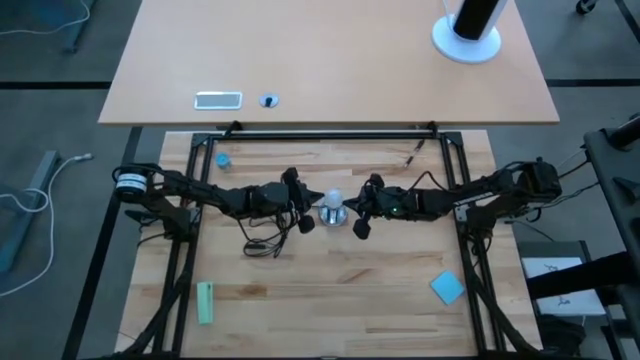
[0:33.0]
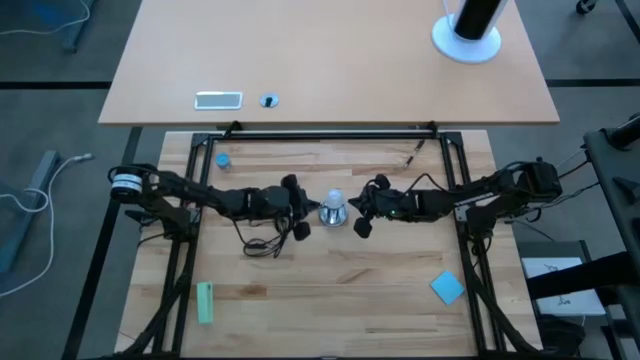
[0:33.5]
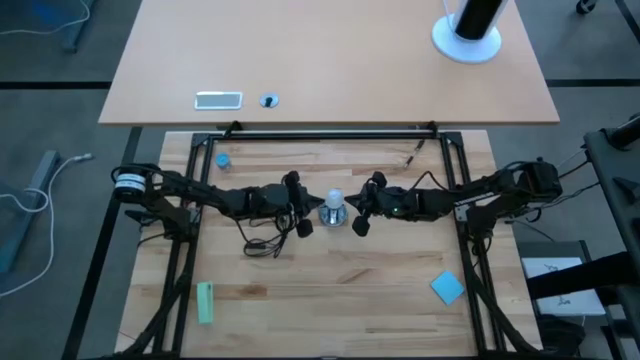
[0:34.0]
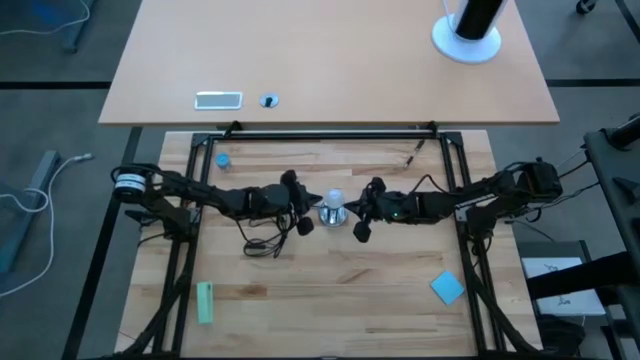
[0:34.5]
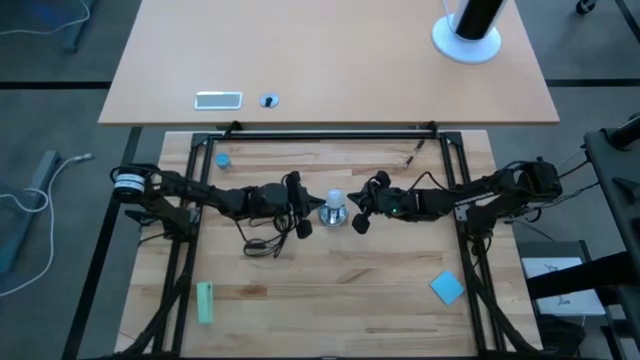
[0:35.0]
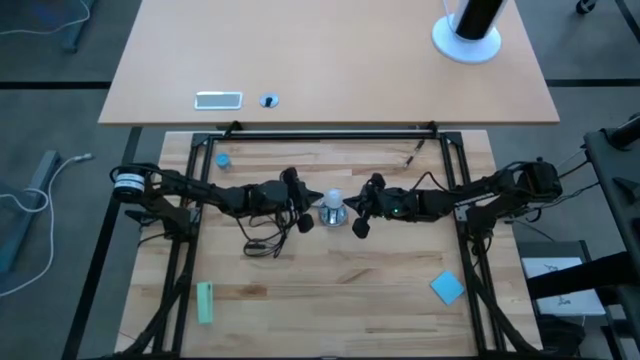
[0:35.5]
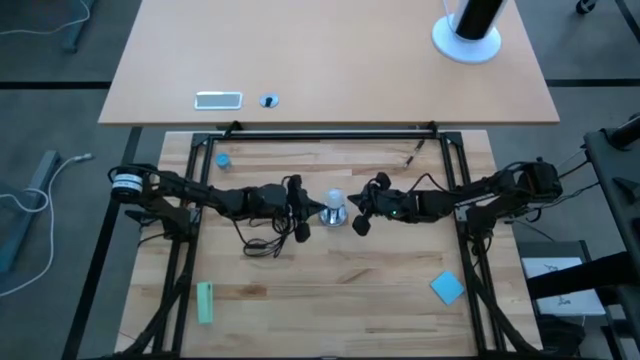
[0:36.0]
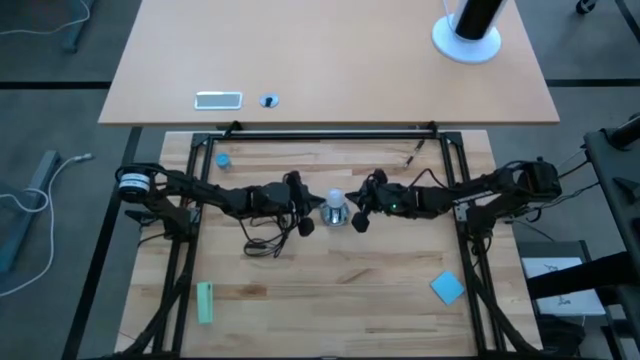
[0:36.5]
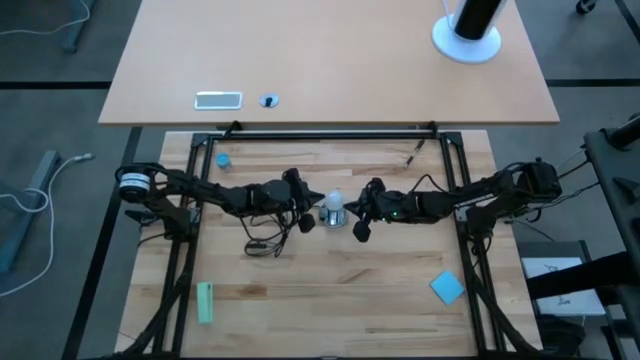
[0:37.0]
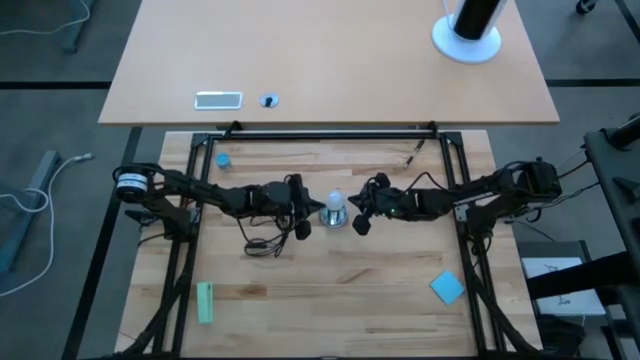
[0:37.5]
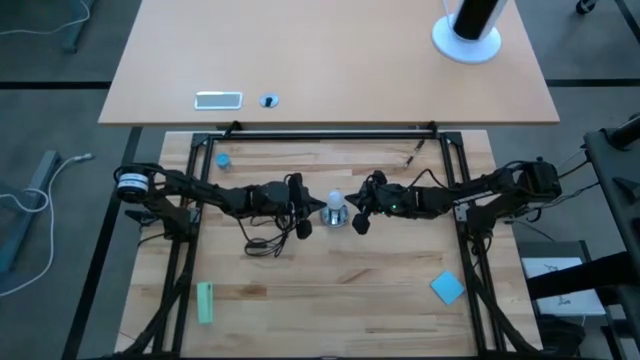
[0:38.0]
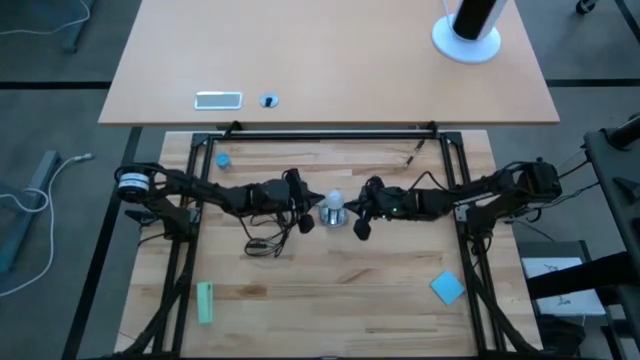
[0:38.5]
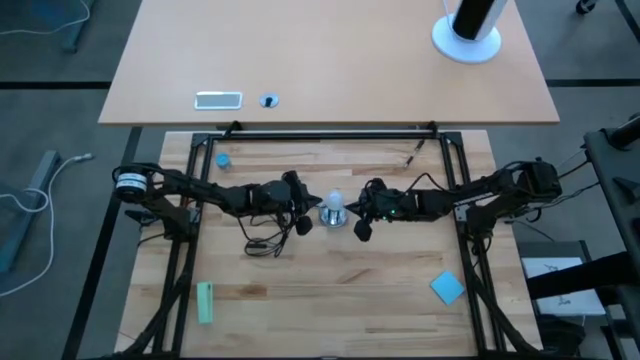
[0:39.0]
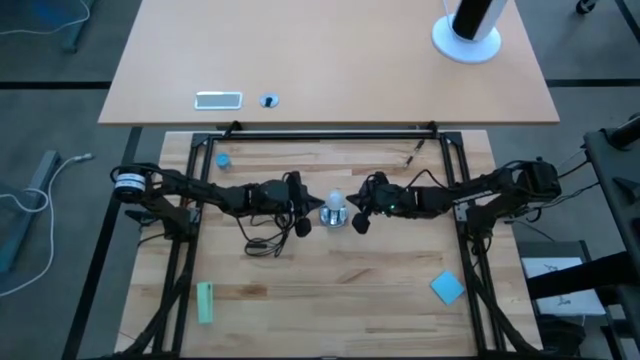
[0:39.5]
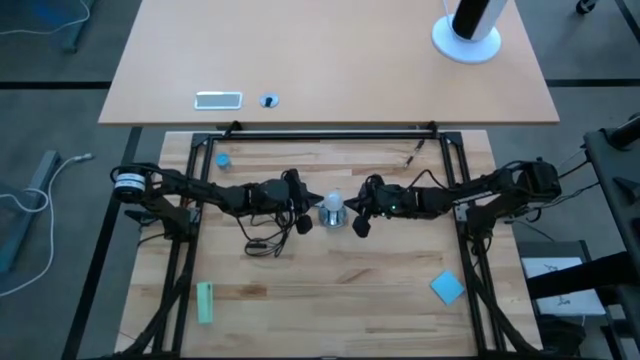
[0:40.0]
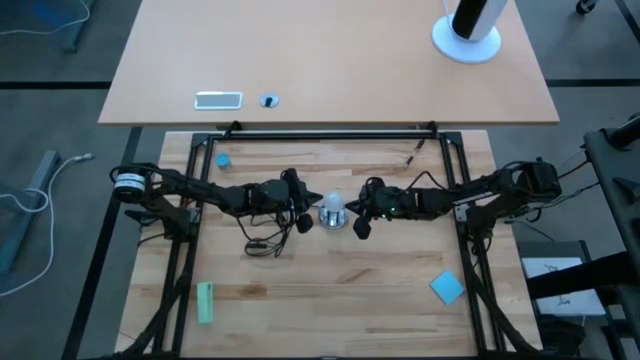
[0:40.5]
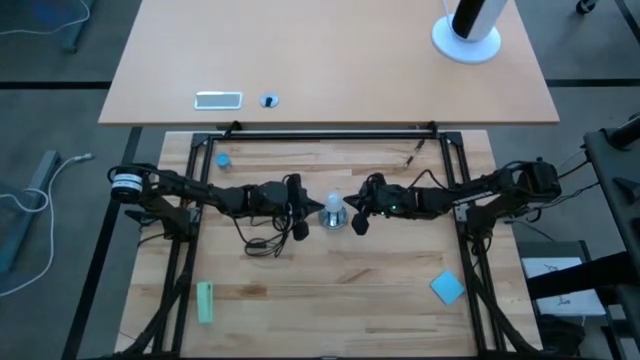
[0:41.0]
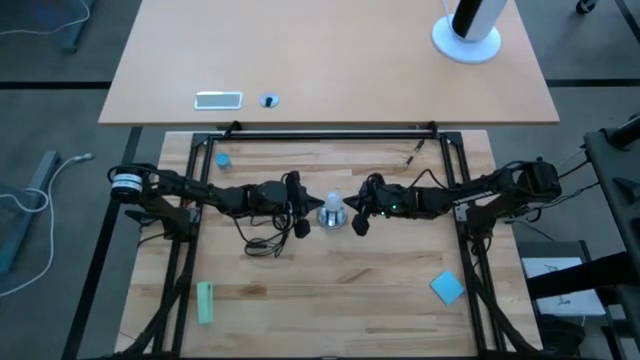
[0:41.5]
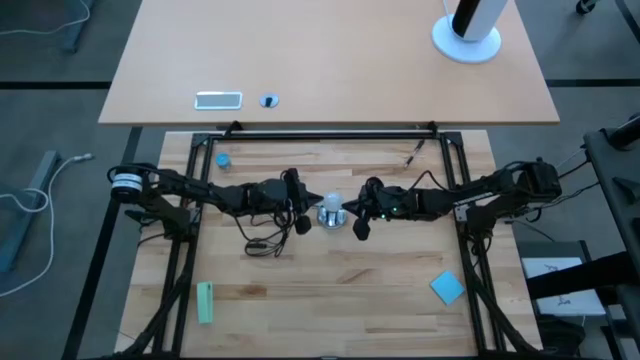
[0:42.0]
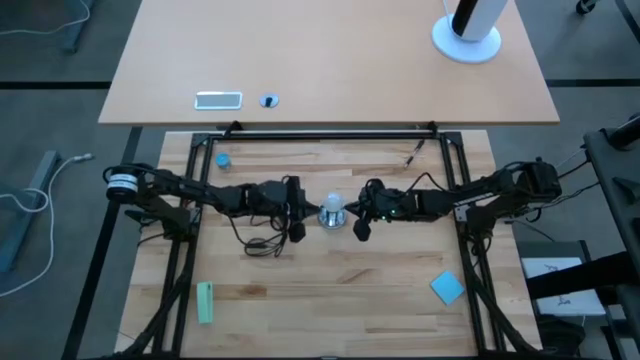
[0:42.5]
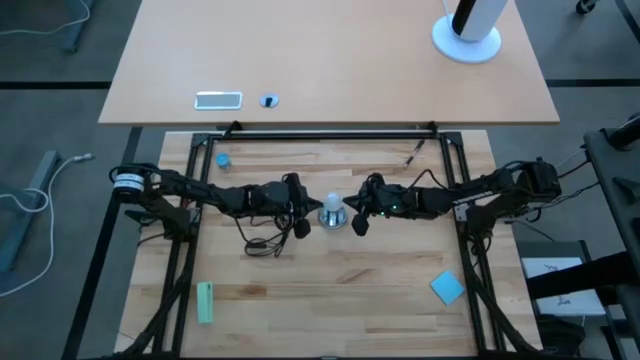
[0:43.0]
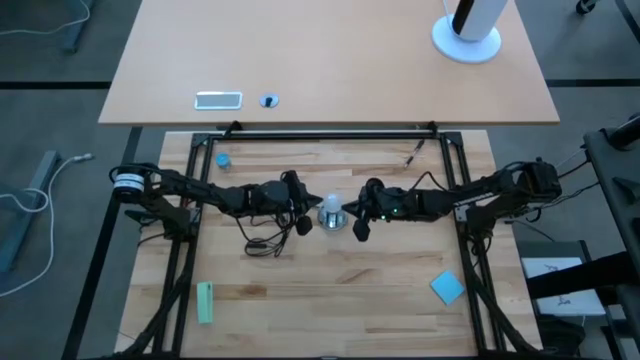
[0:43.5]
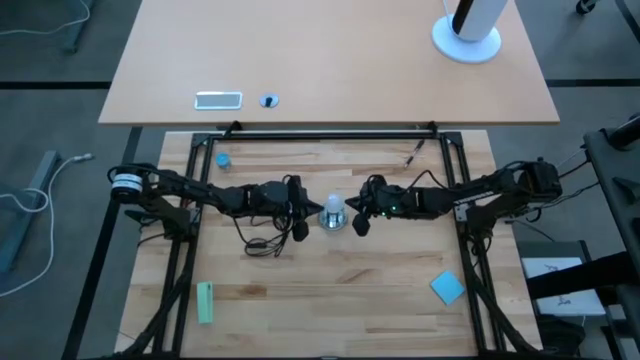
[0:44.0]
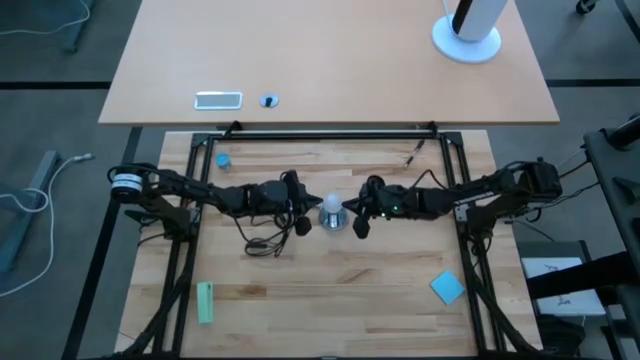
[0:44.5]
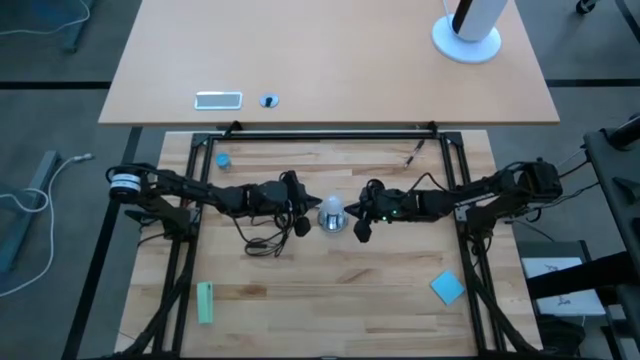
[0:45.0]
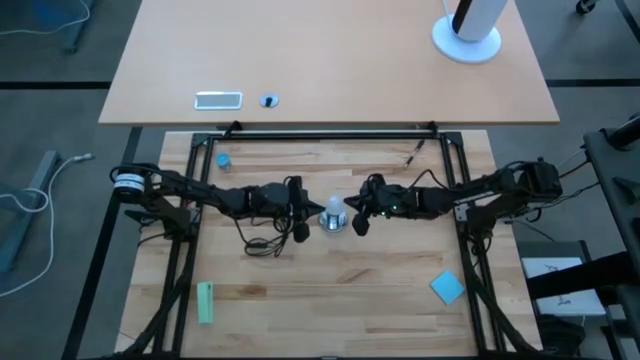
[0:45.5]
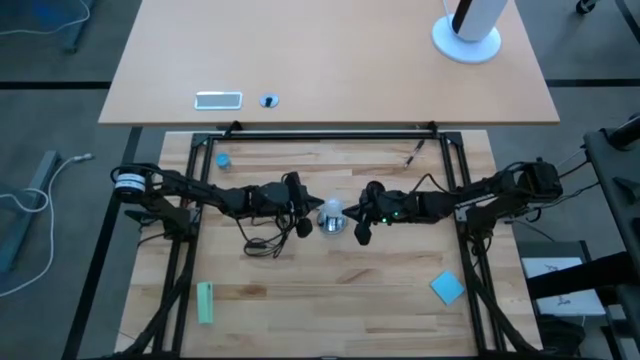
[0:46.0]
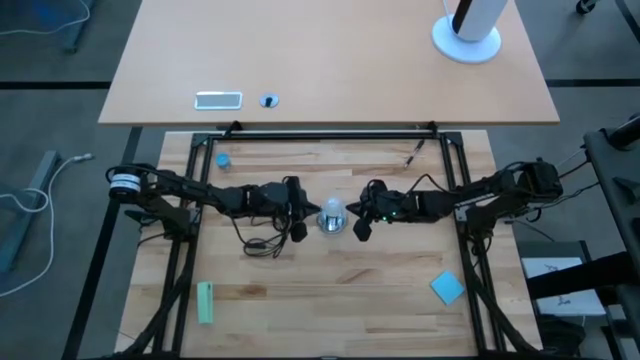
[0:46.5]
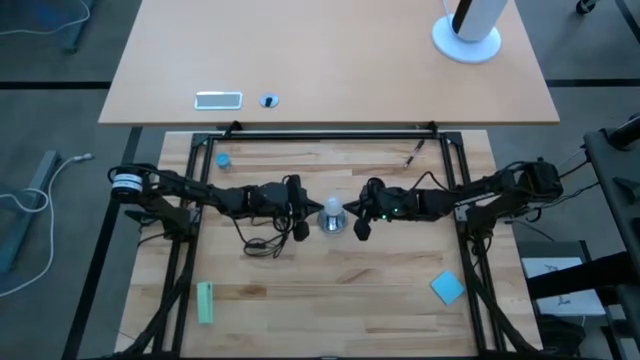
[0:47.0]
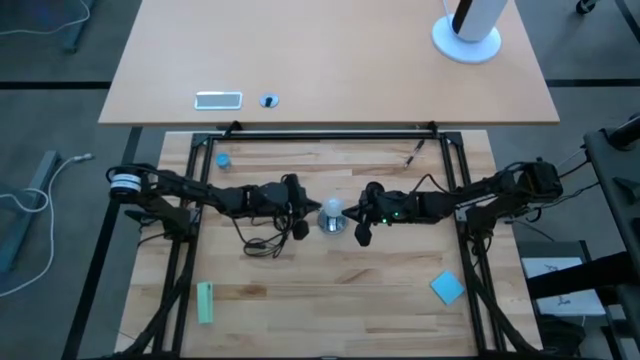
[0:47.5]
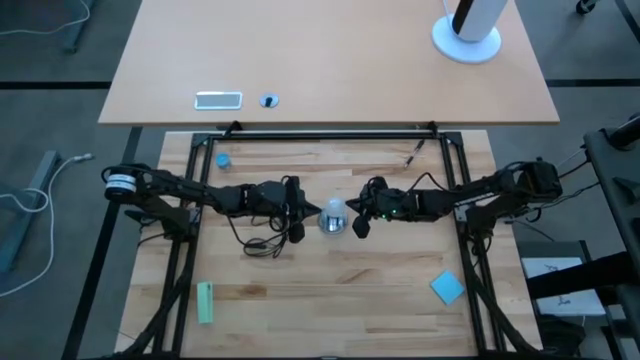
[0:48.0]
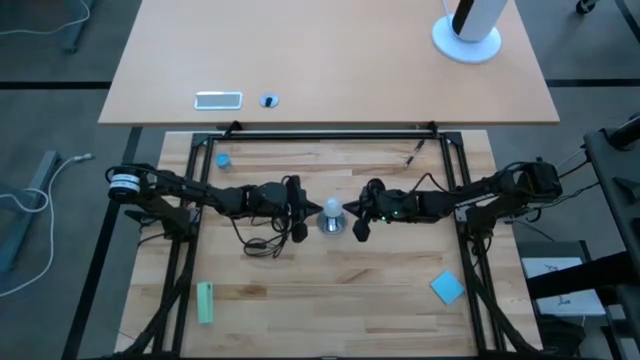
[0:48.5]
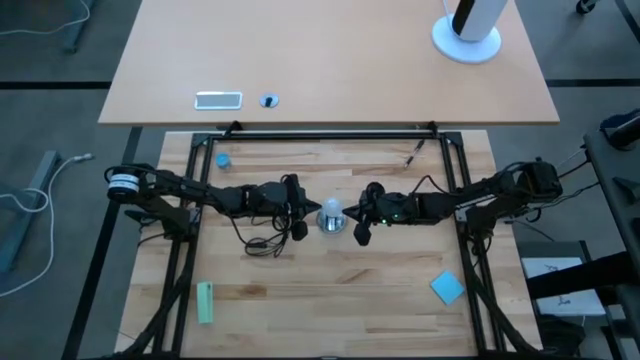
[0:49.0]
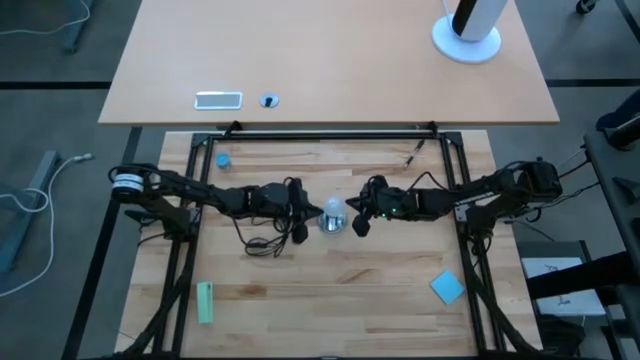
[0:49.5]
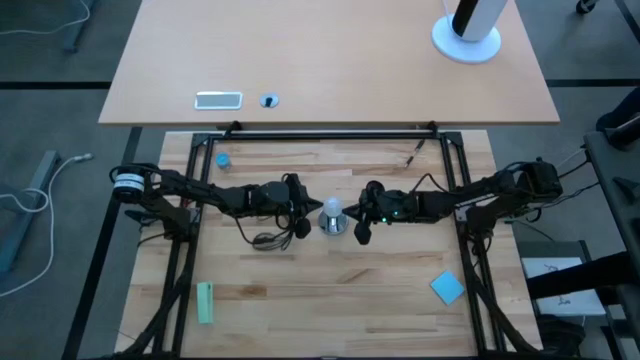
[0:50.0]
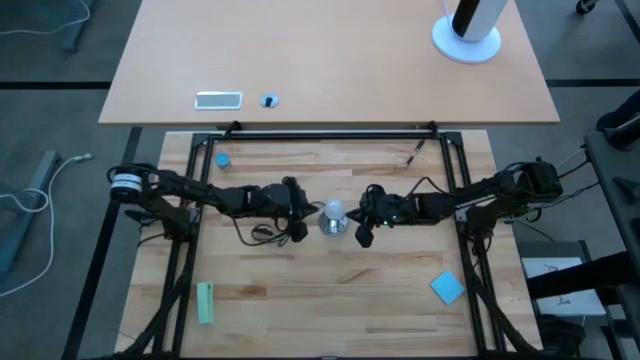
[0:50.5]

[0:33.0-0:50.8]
Task: Screw lightbulb
Insert the white lightbulb into the metal lamp
